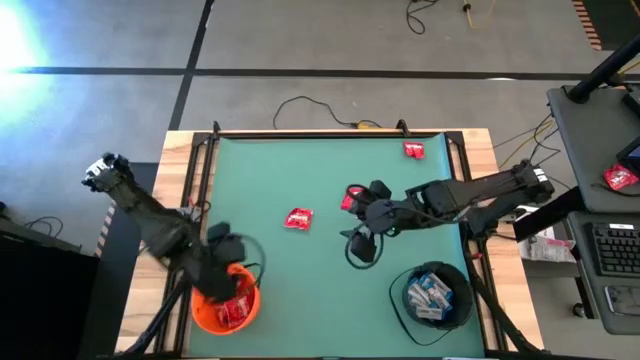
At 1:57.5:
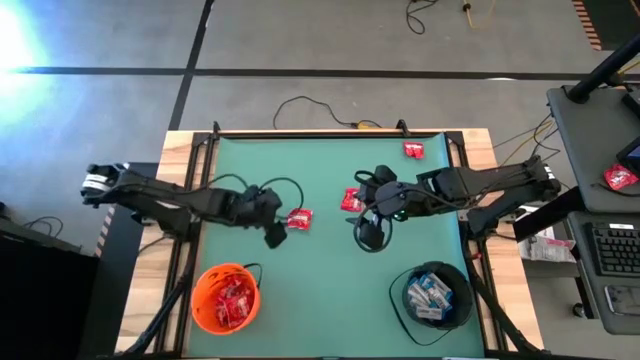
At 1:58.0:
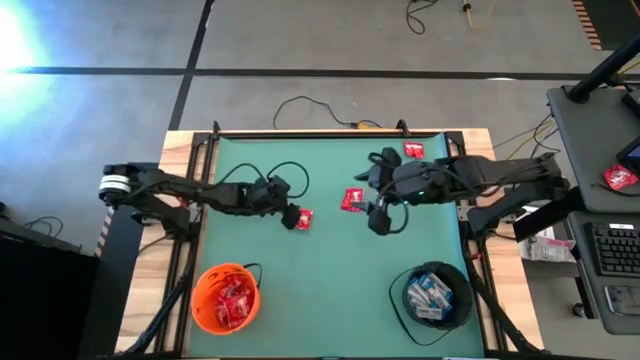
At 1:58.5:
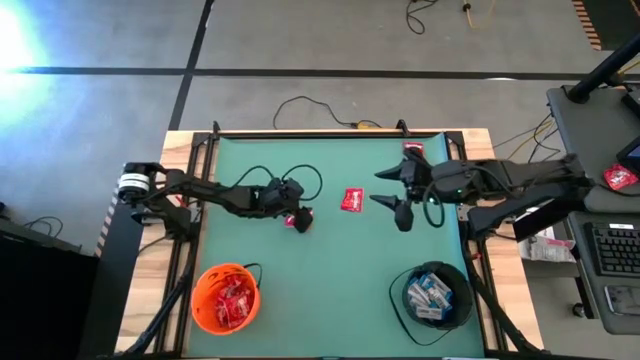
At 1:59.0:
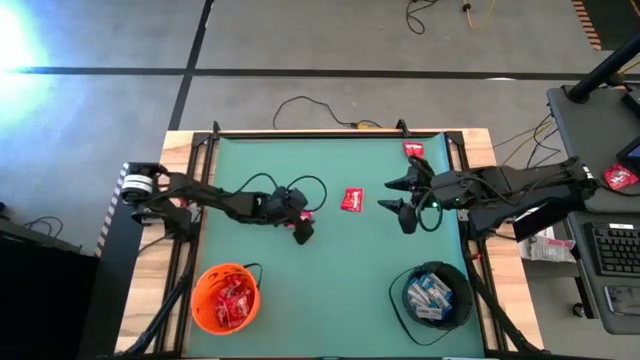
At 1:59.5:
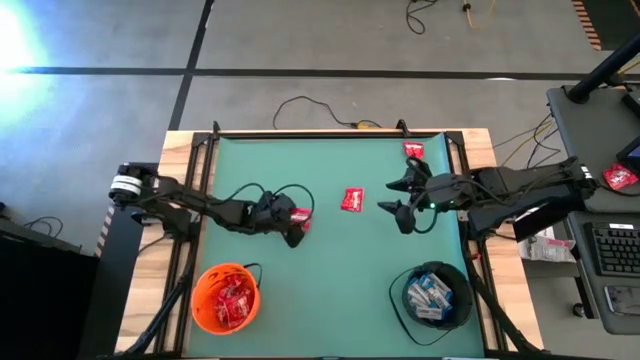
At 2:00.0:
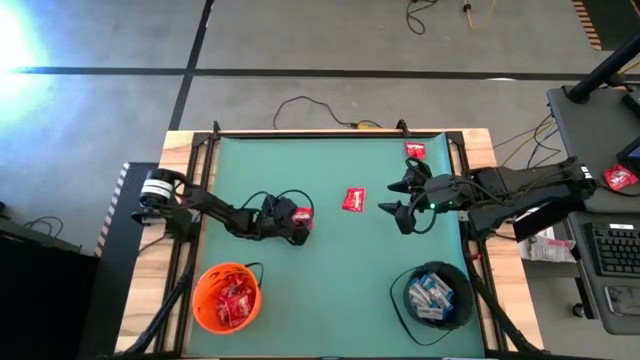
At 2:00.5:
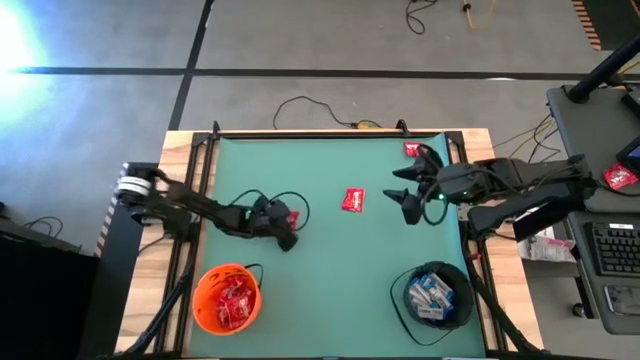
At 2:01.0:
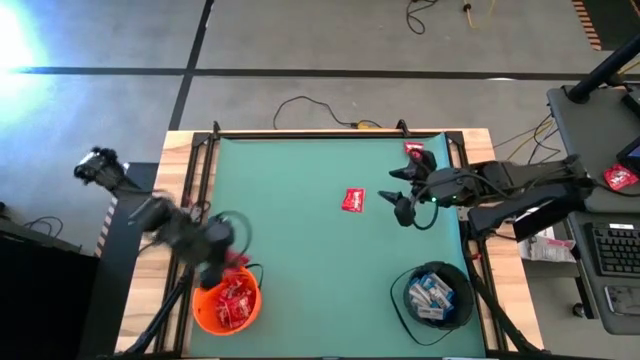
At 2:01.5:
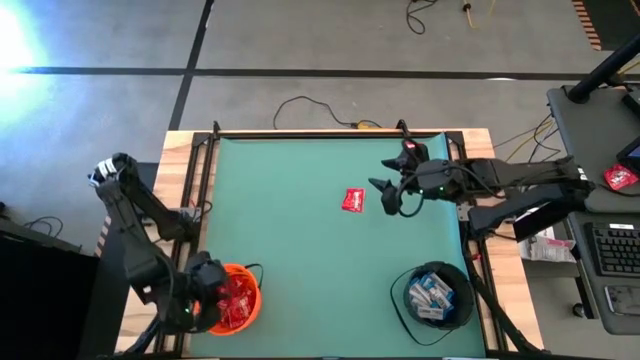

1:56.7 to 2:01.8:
Task: Sort candy by brand, put in halloween buckets
Put the red chocolate candy into the orange bucket

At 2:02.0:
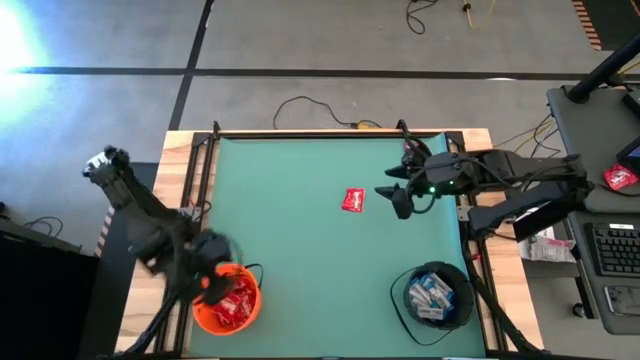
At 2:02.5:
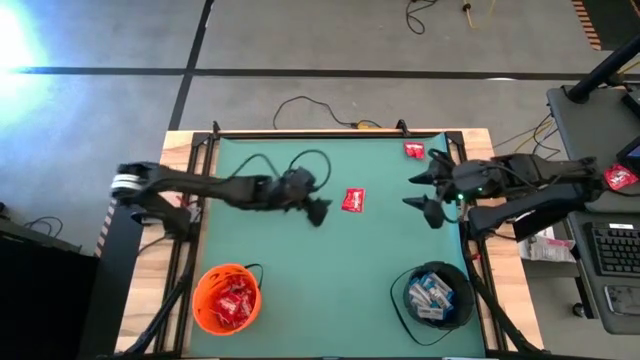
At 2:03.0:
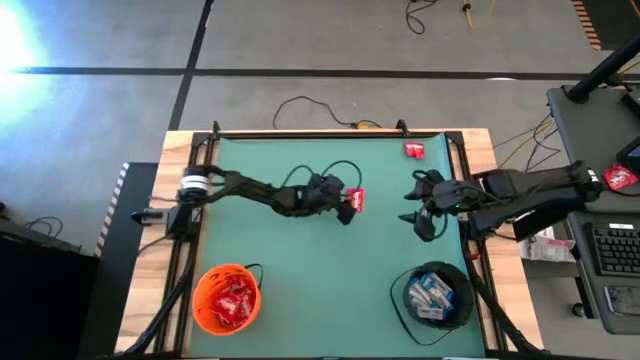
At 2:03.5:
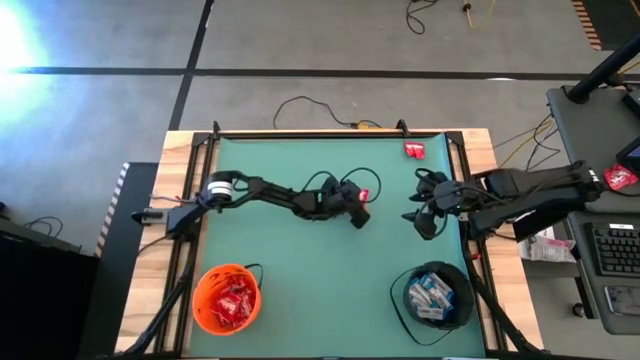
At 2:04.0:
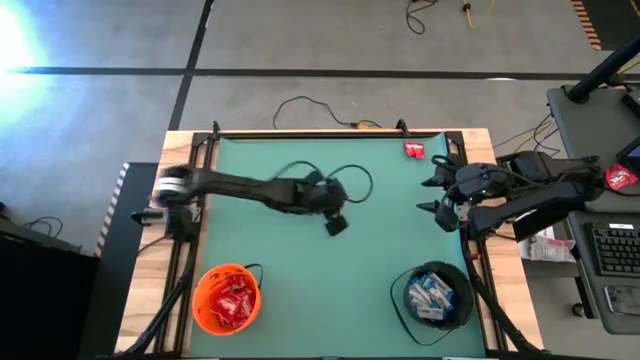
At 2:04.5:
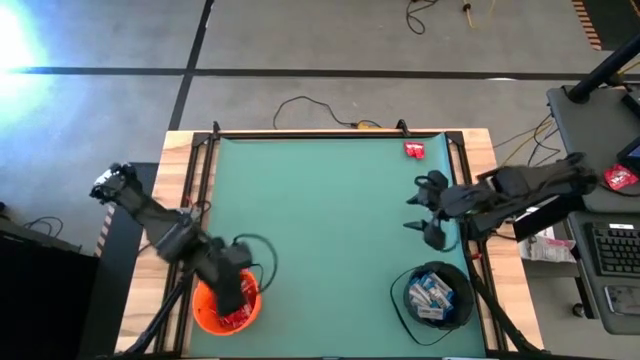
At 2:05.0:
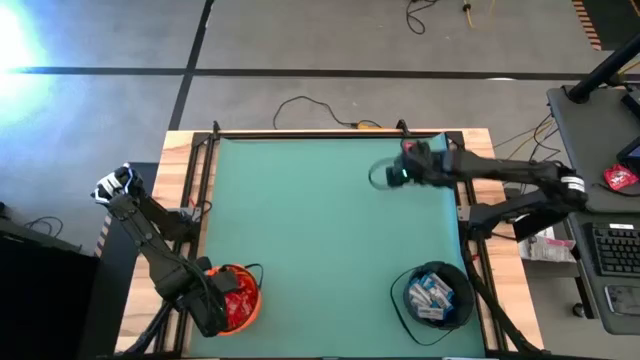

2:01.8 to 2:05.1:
Put the red chocolate candy into the orange bucket

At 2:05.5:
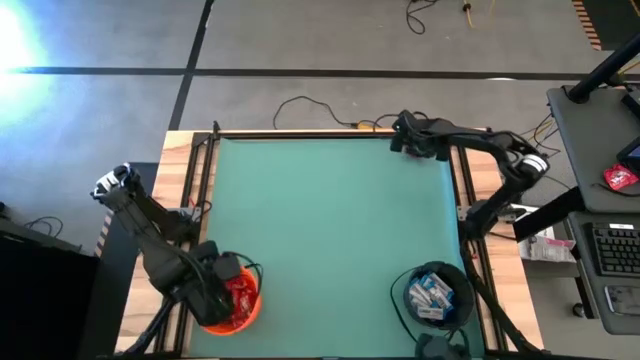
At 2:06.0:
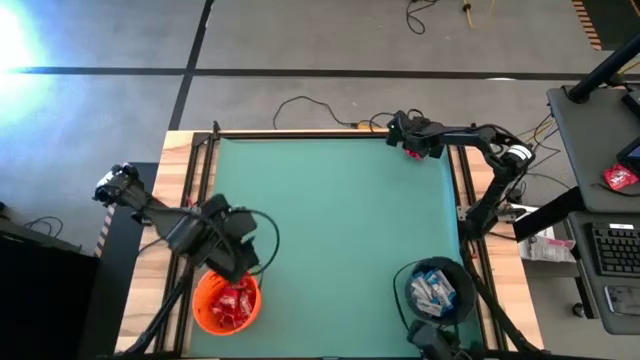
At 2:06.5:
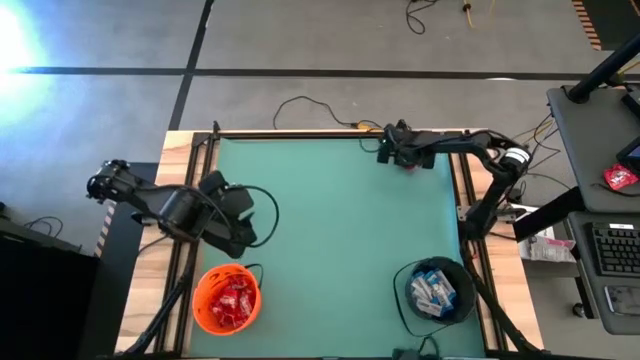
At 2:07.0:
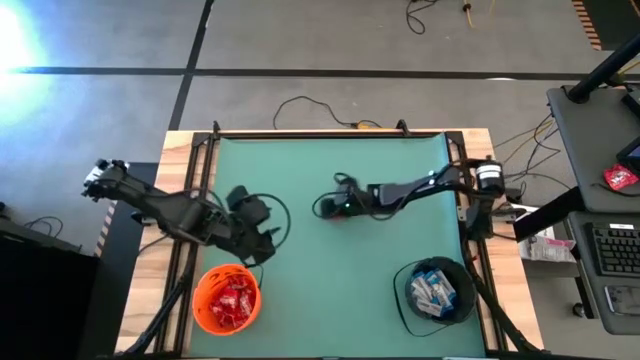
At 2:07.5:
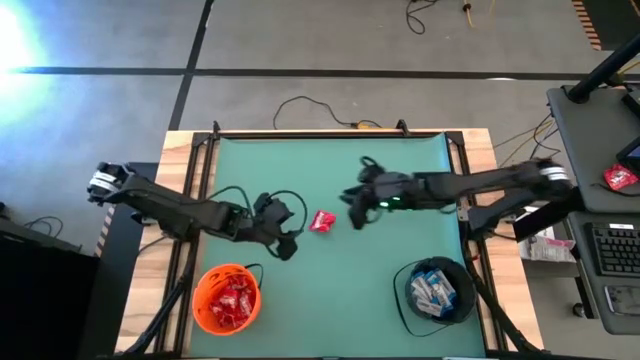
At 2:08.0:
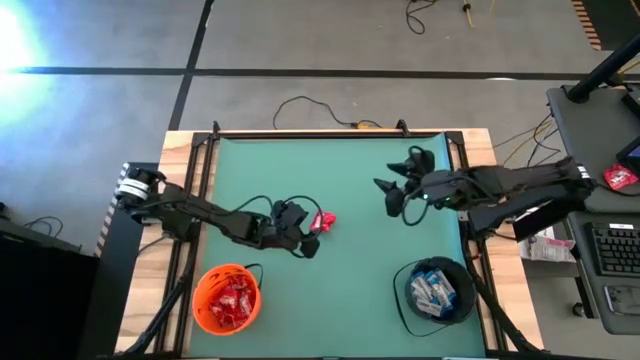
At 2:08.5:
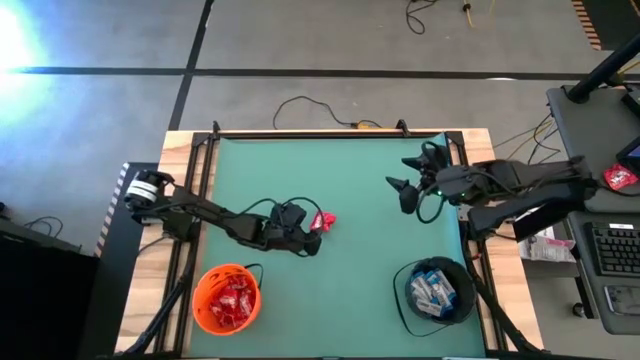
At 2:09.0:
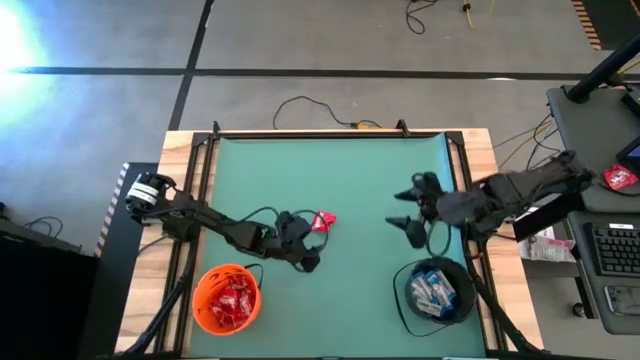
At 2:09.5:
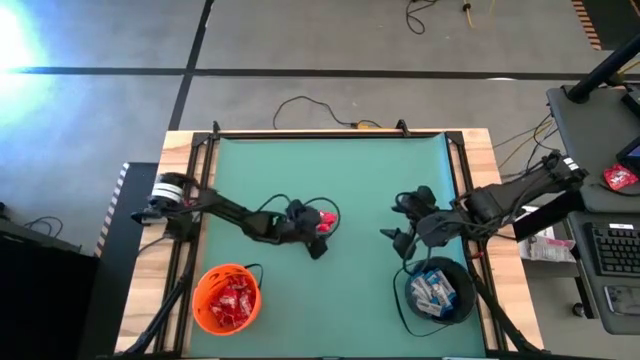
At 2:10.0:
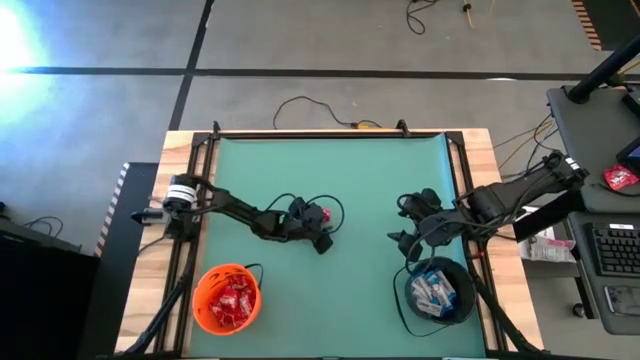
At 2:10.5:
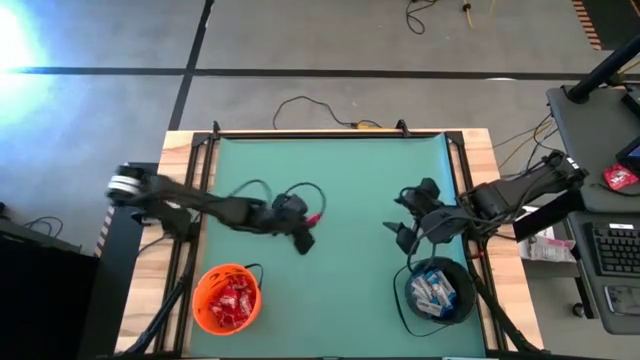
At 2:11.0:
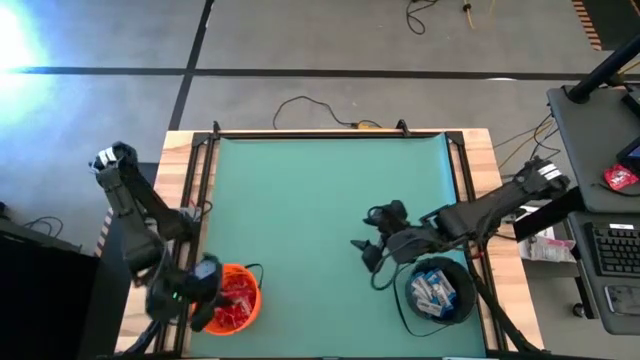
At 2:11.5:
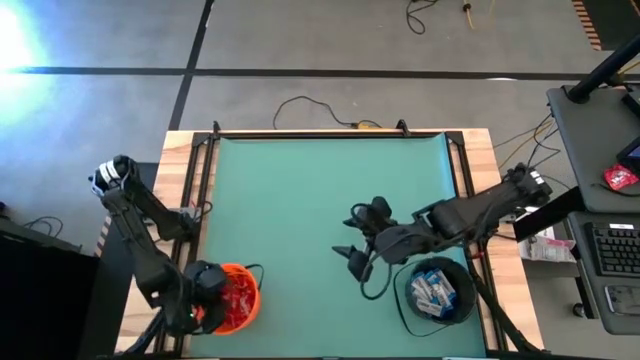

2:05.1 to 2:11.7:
Put the red chocolate candy into the orange bucket

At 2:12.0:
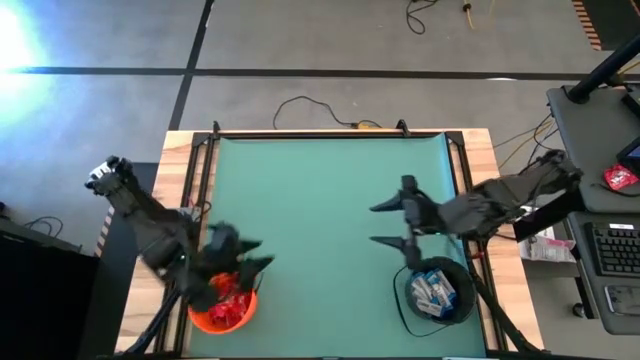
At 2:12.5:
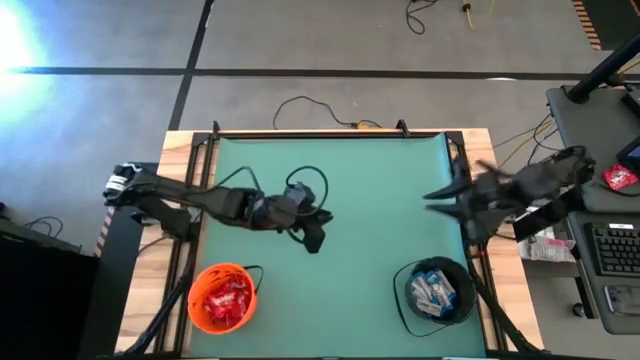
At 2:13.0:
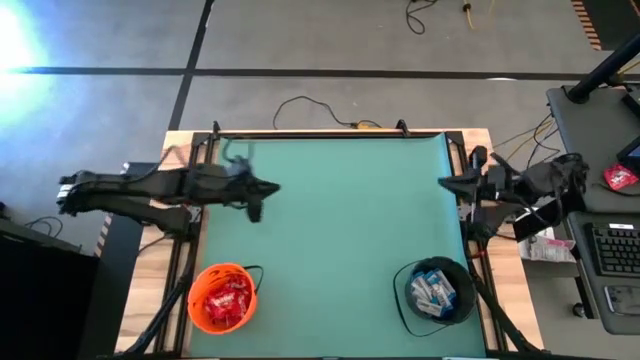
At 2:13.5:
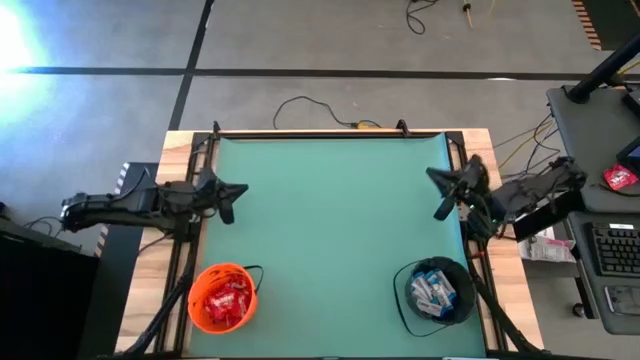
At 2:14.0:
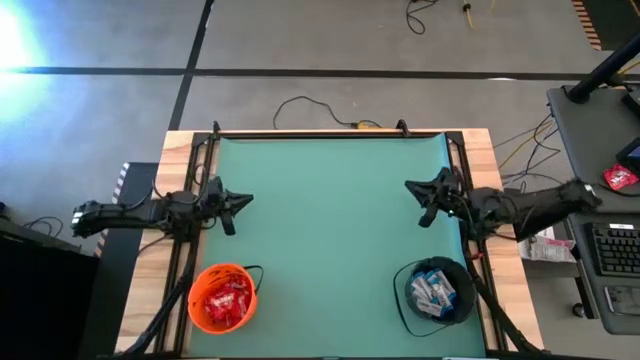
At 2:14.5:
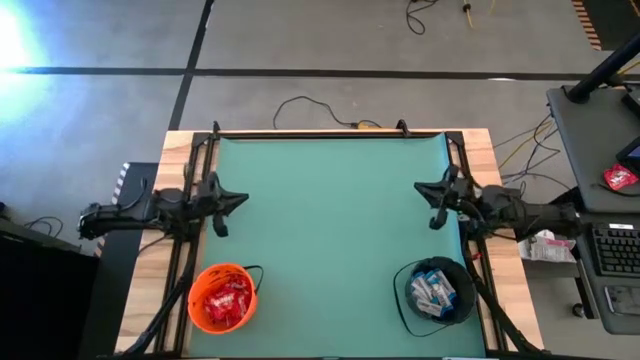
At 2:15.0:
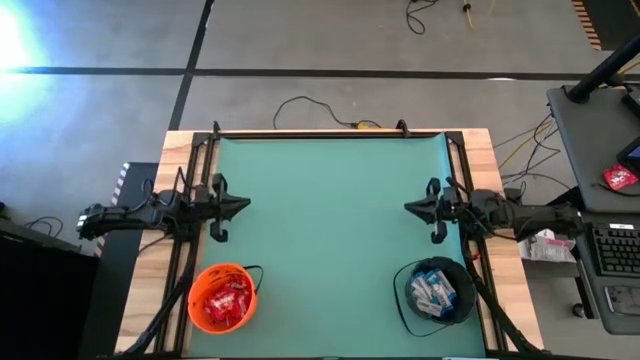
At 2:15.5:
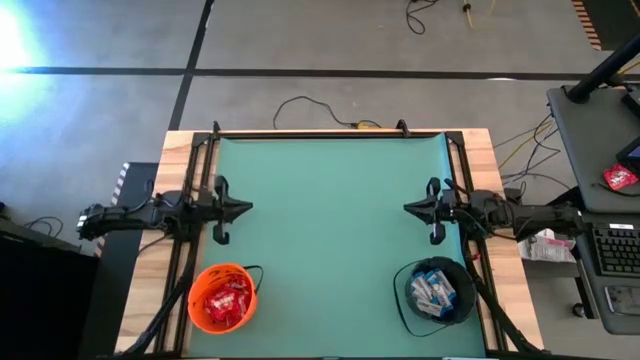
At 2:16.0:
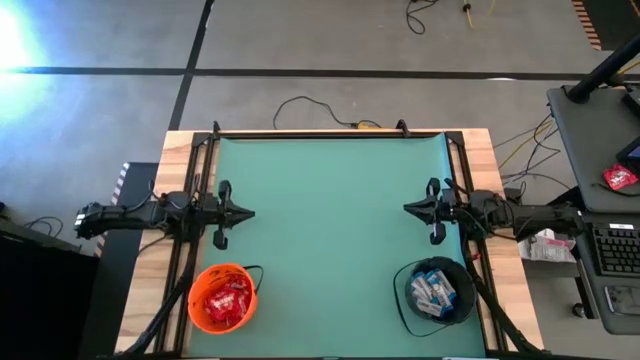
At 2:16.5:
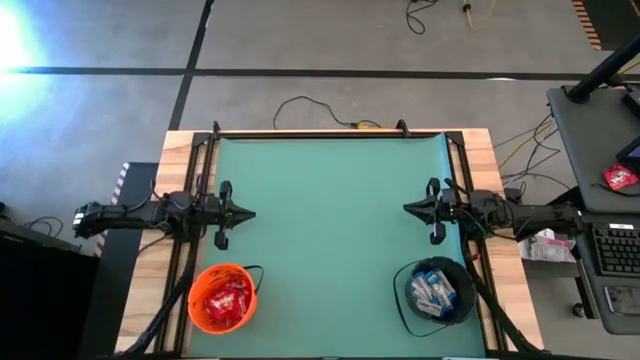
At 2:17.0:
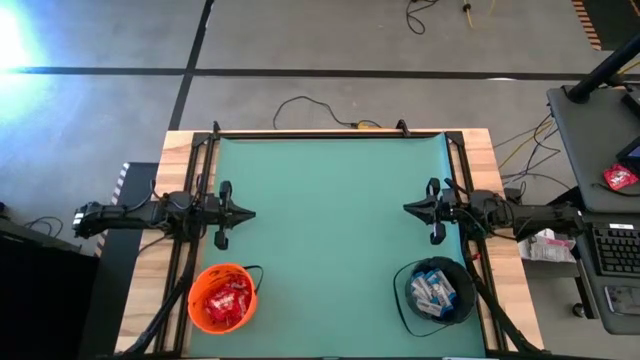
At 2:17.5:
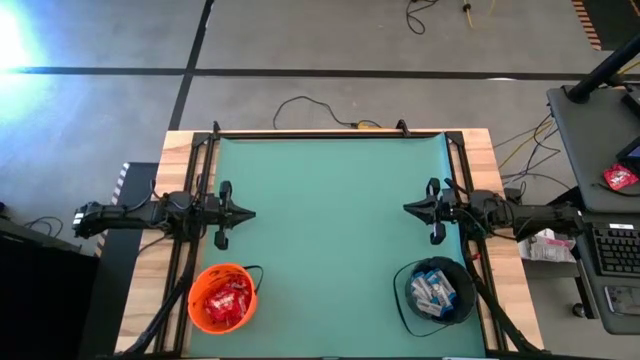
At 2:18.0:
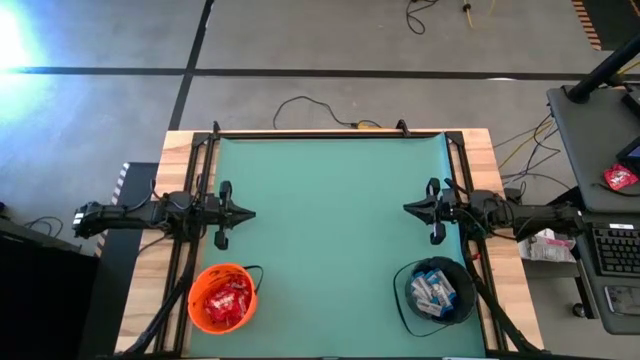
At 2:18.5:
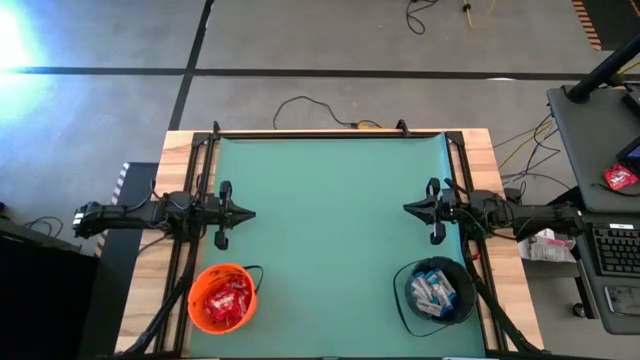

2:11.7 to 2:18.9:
Return to Home Position
